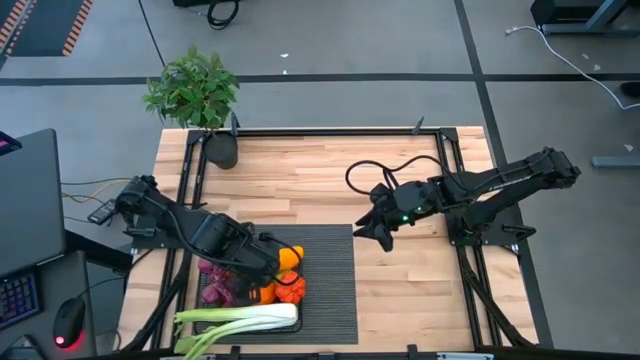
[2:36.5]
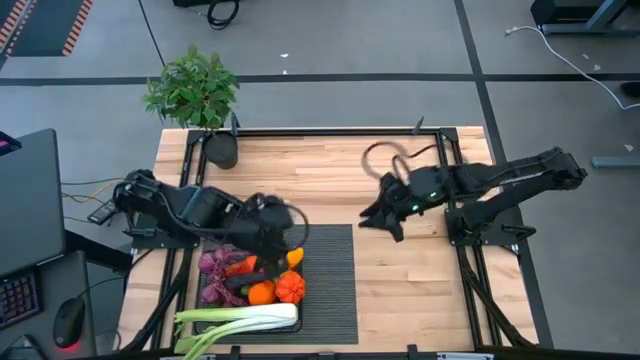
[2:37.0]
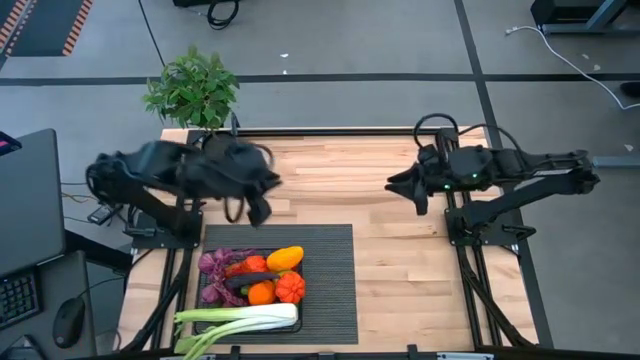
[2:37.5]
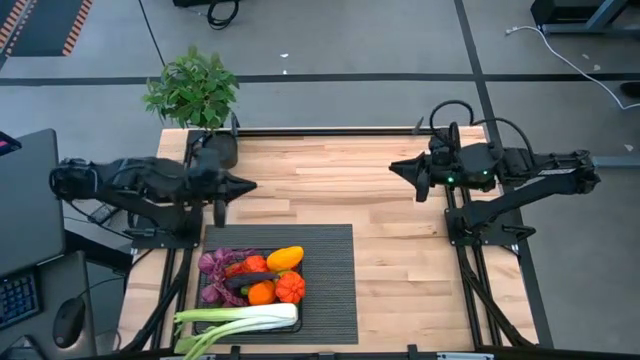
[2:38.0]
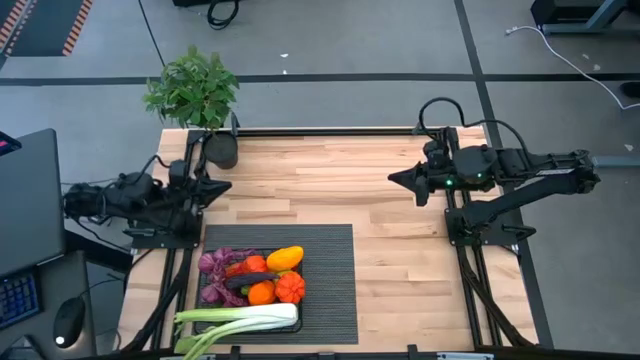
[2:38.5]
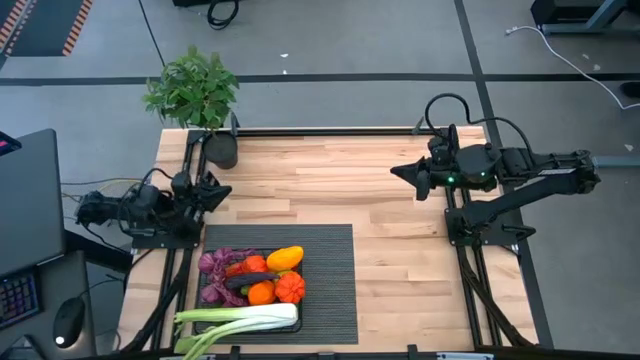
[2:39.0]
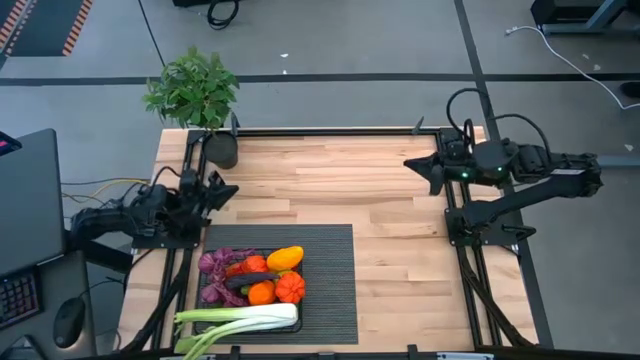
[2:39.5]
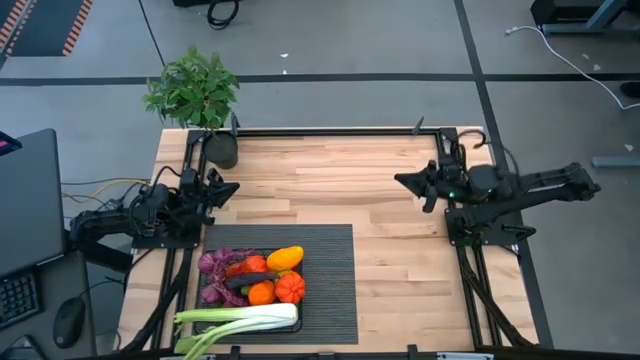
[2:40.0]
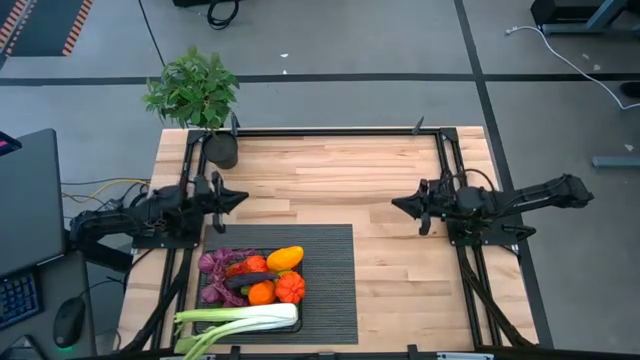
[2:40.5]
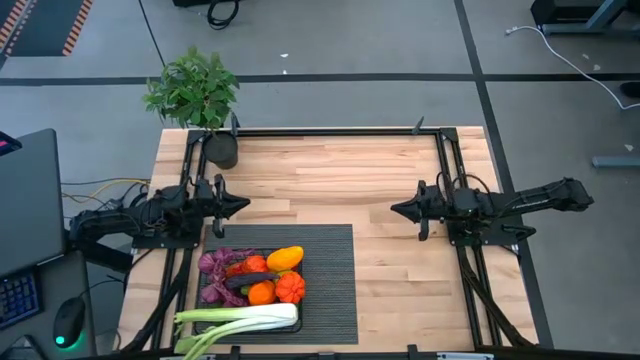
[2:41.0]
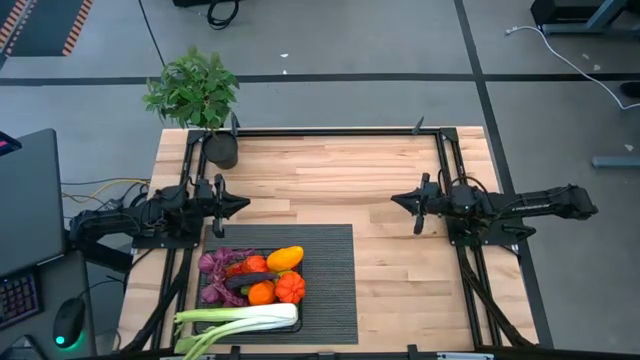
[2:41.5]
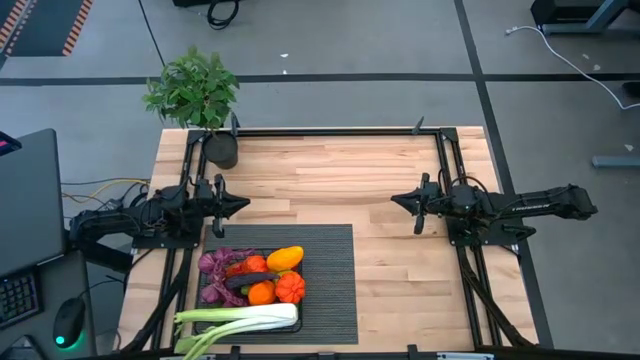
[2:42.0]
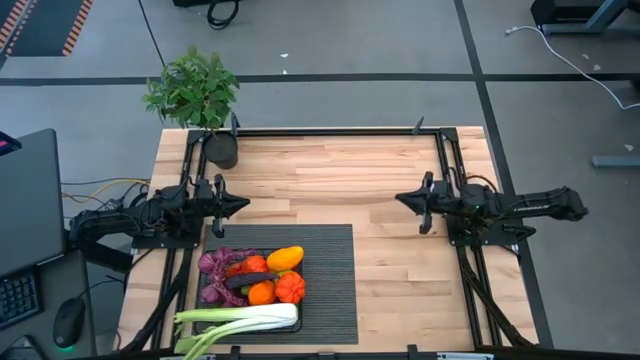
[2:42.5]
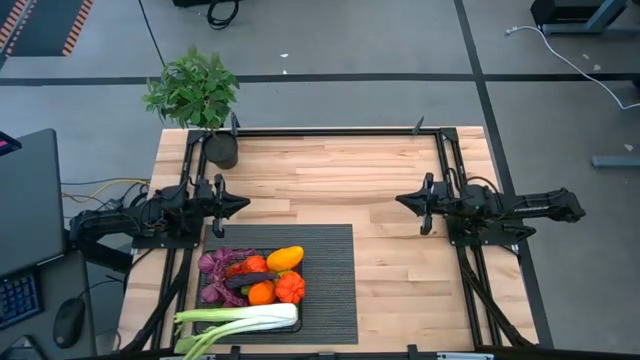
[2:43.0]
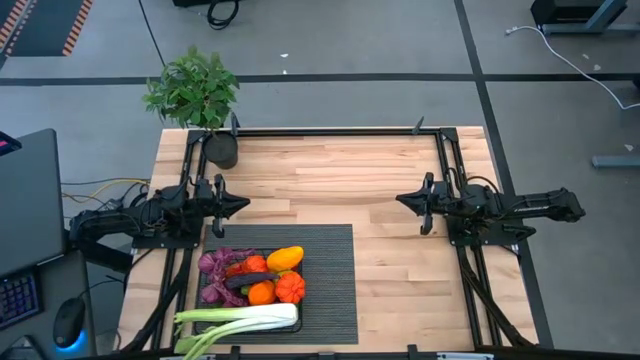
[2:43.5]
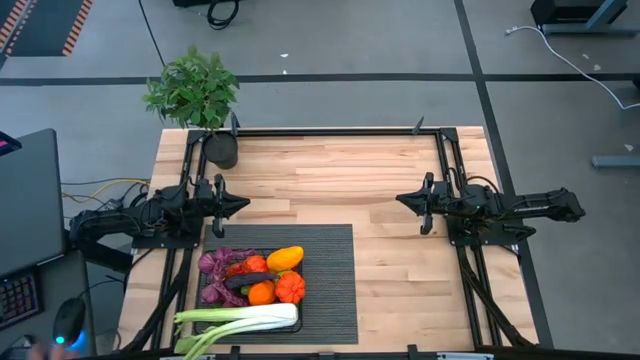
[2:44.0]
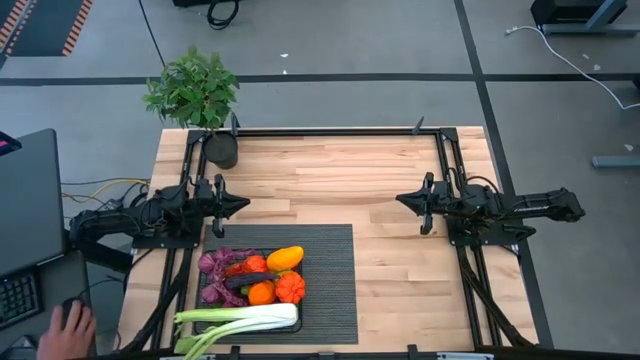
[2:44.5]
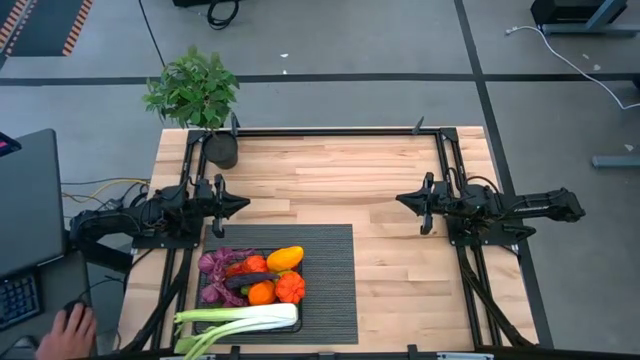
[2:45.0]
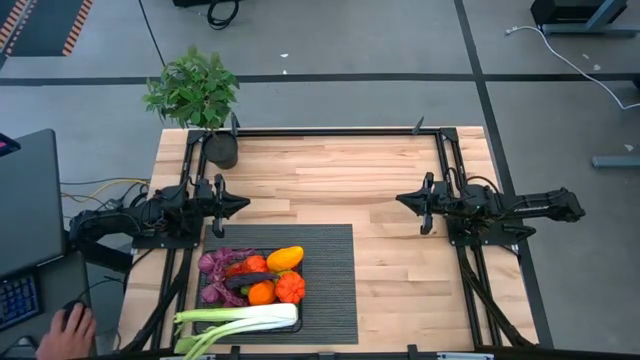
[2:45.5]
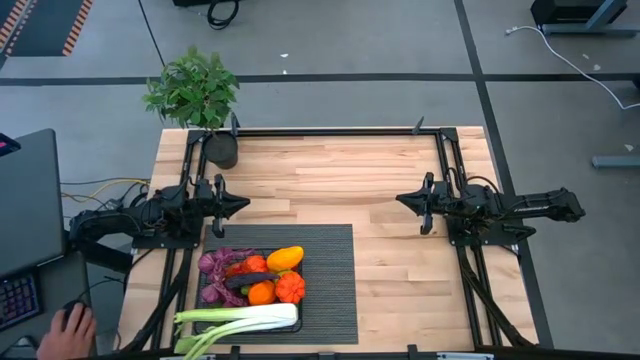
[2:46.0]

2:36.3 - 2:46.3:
Task: Build produce basket
Return to Home Position

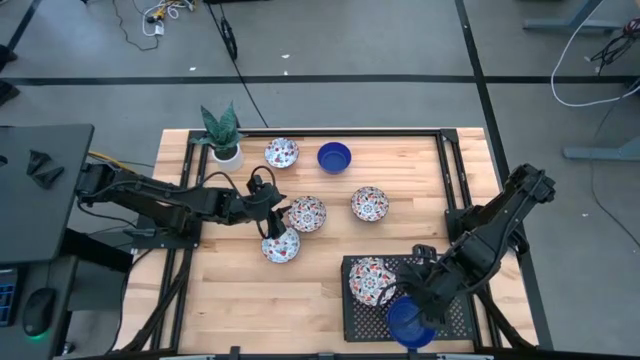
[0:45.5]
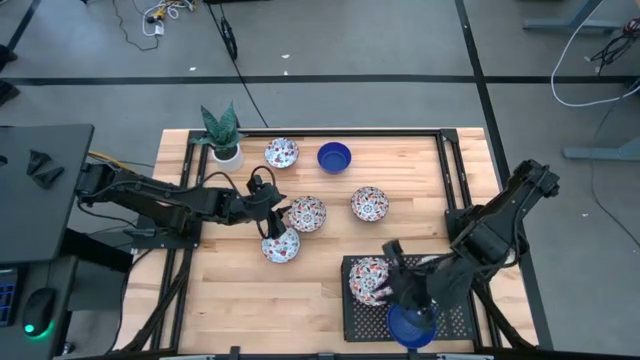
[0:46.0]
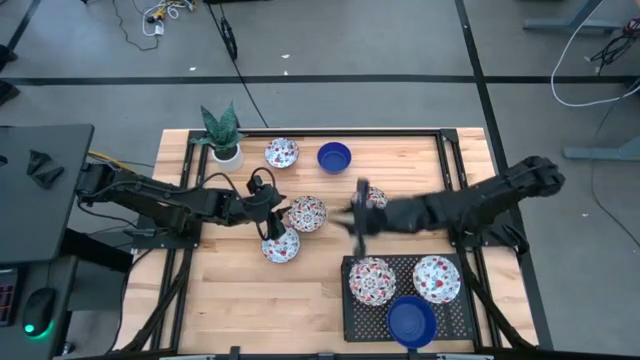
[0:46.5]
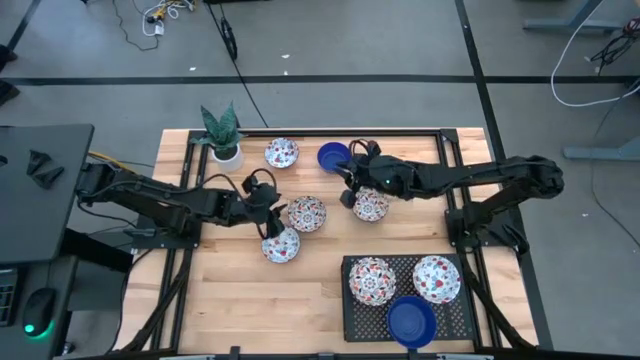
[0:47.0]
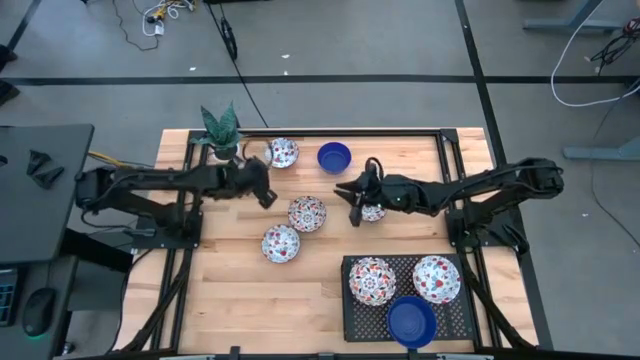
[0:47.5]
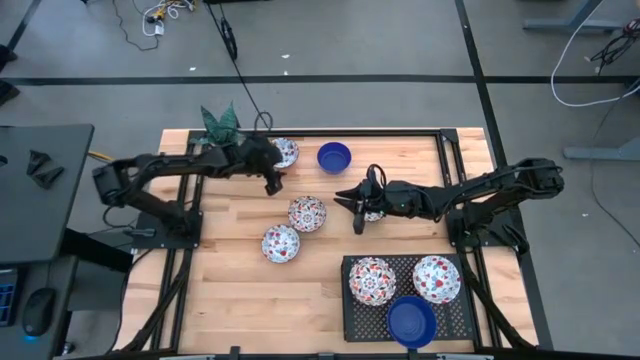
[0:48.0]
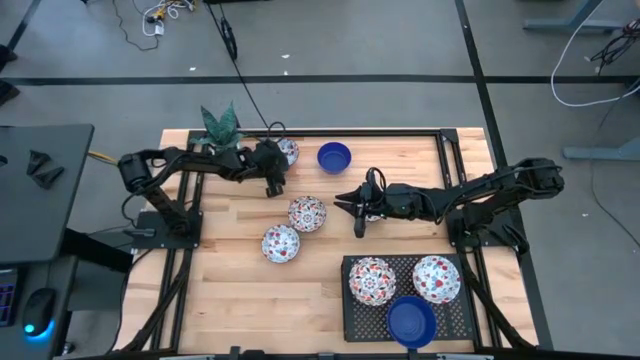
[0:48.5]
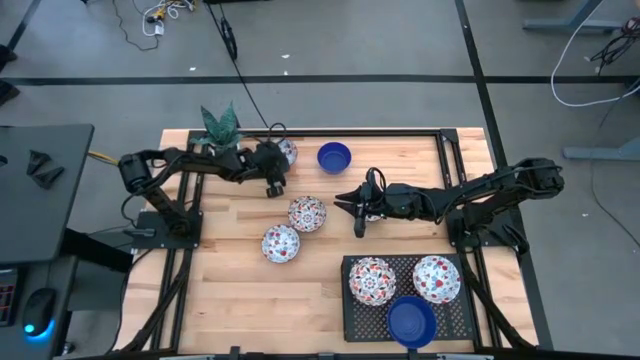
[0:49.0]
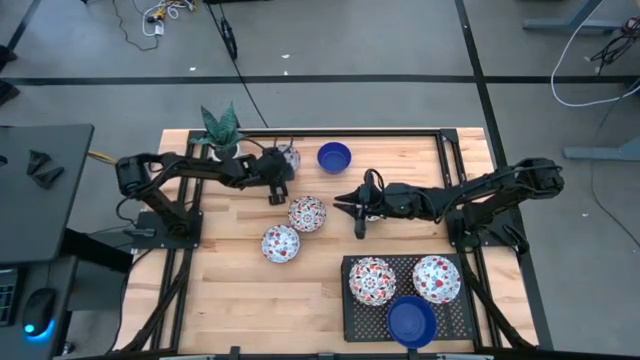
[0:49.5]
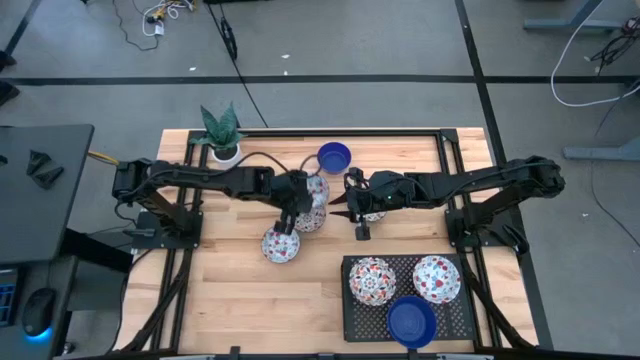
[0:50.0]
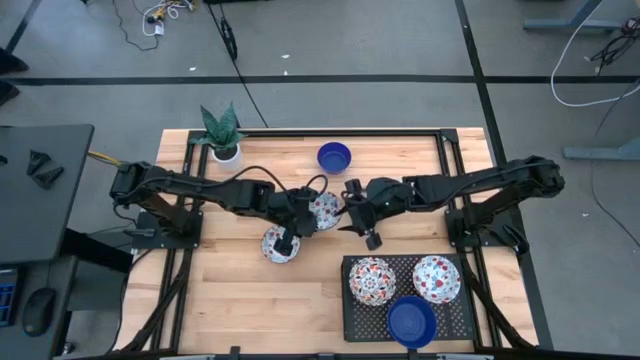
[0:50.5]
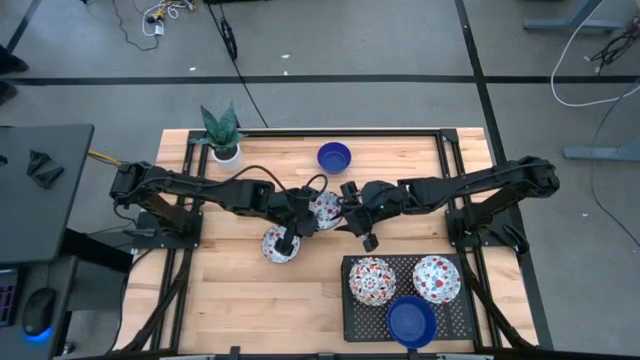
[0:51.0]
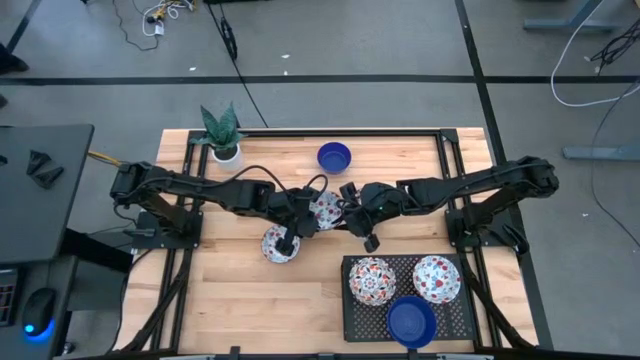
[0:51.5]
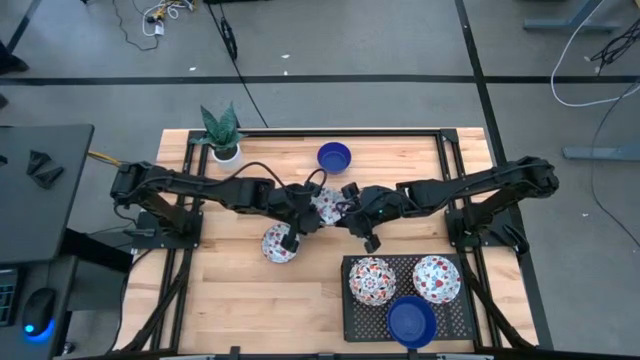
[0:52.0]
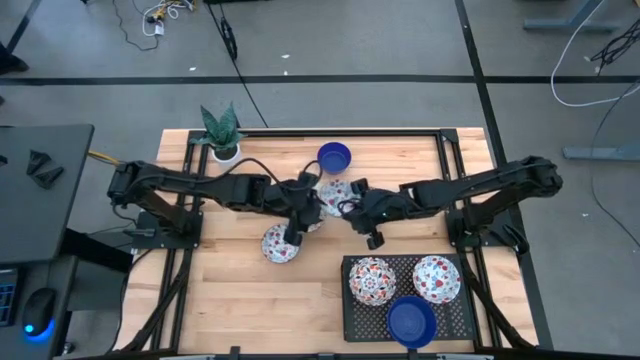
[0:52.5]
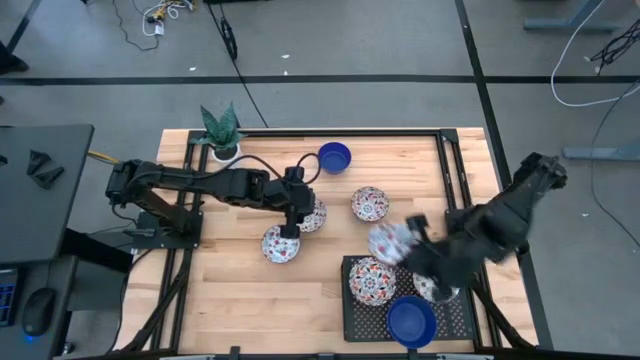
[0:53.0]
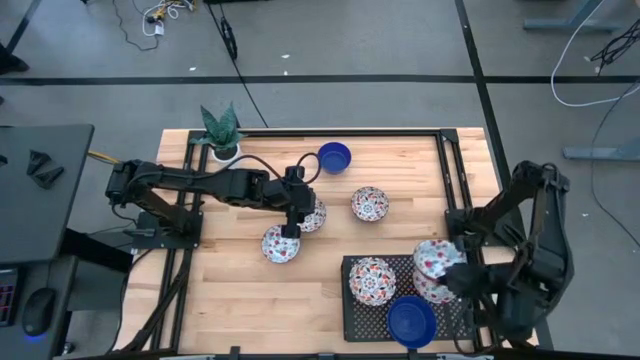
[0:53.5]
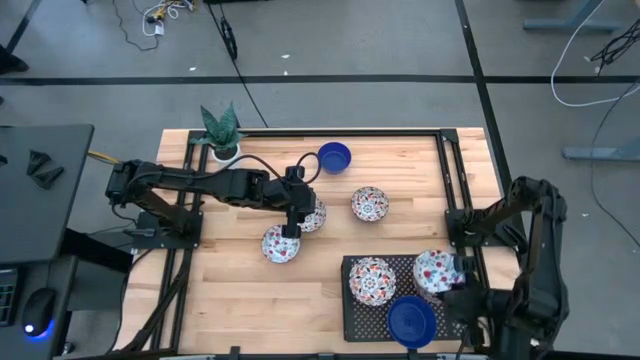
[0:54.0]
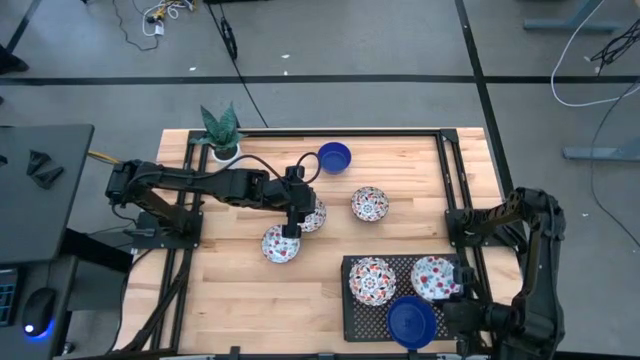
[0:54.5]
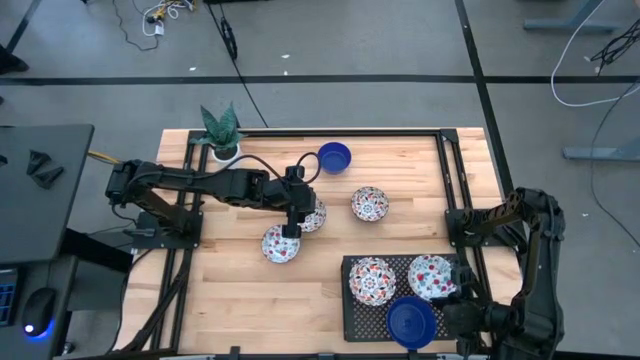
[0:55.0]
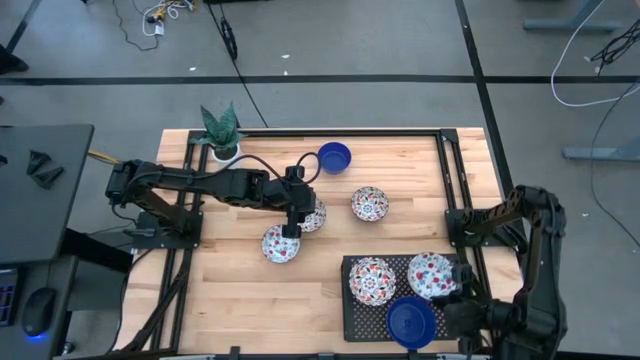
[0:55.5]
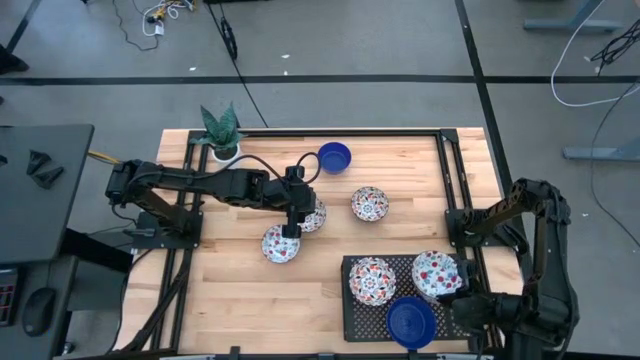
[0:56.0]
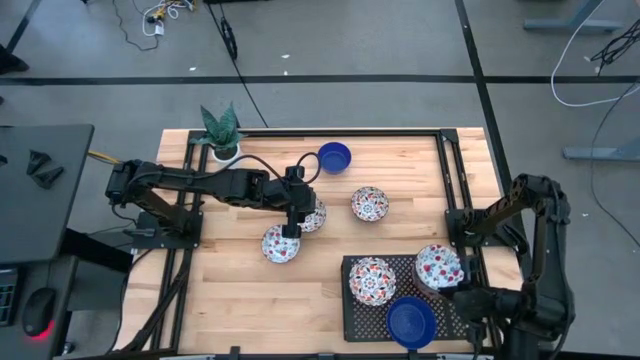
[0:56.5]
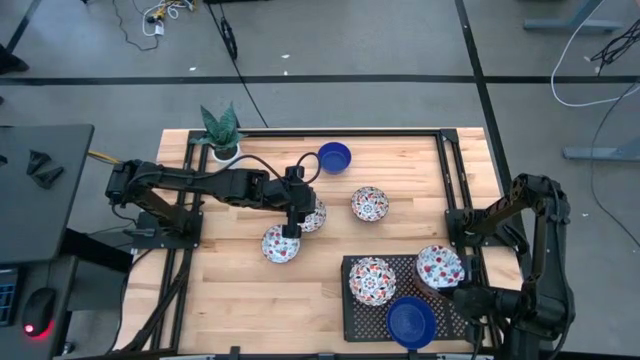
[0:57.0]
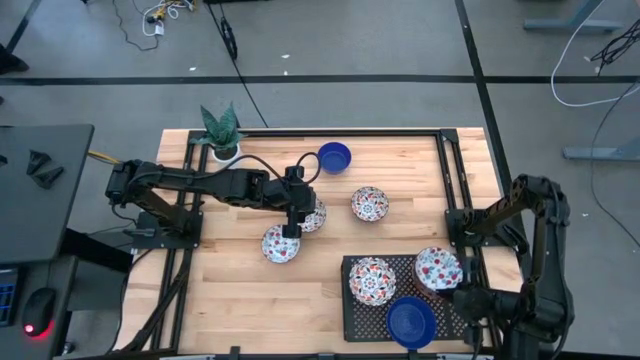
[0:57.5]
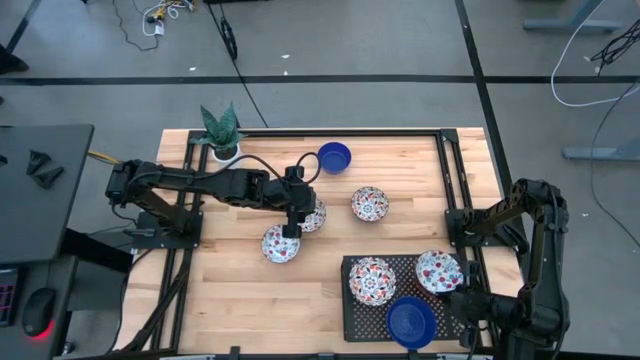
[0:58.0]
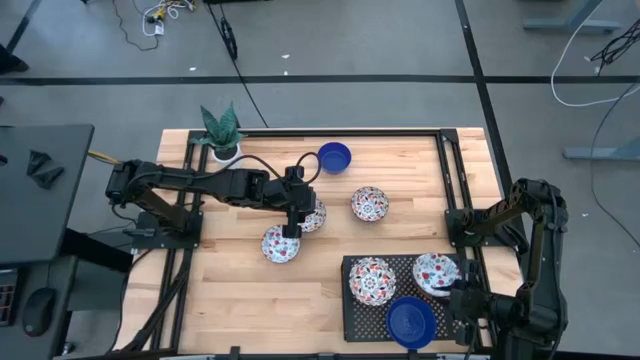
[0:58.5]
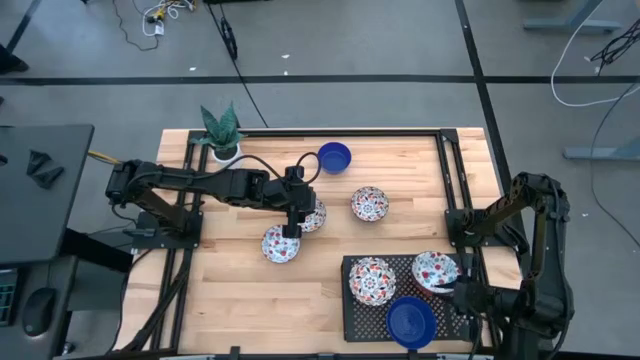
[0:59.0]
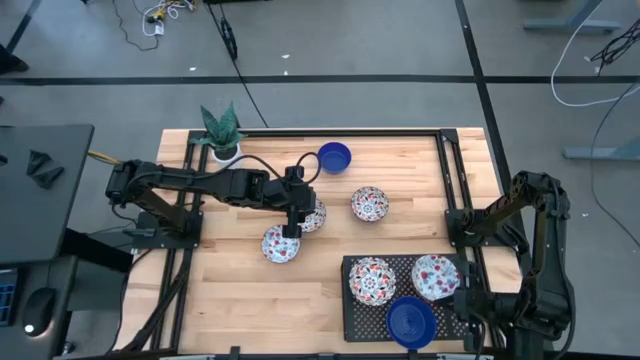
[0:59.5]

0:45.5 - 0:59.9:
Task: Pick & Place Mini bowls
Stack the top white patterned bowl on top of the white patterned bowl on the shelf
